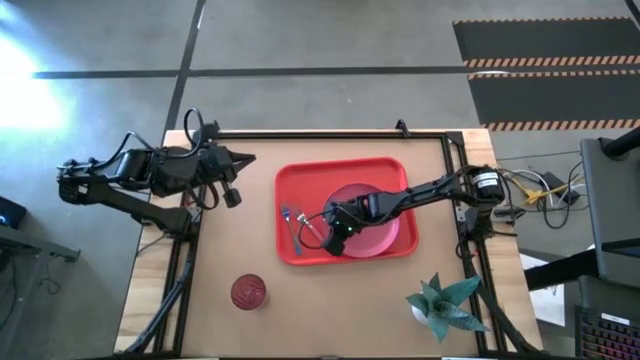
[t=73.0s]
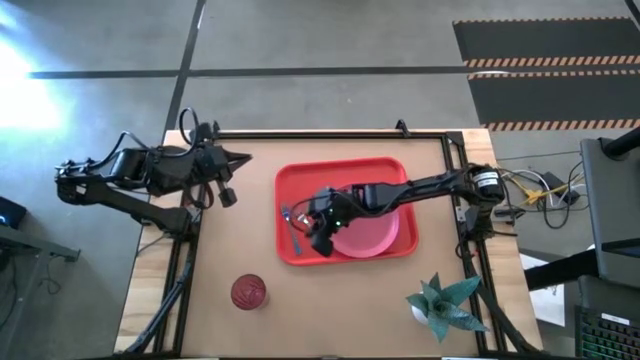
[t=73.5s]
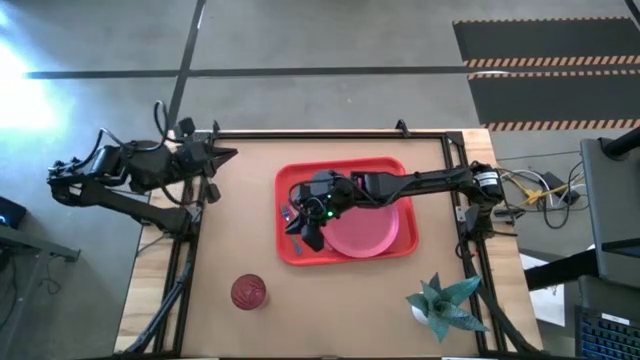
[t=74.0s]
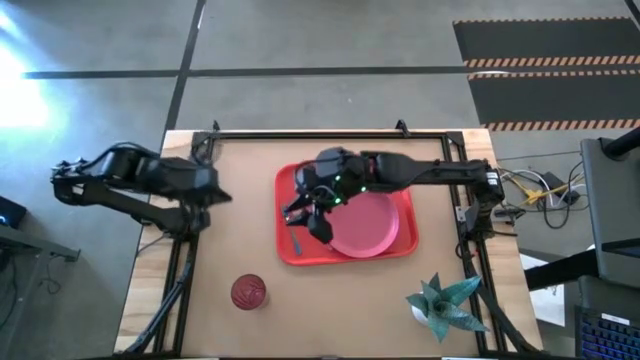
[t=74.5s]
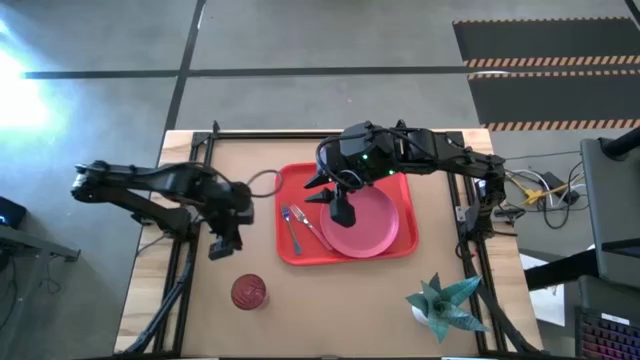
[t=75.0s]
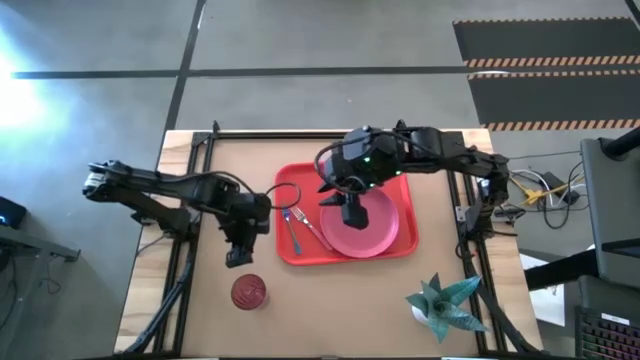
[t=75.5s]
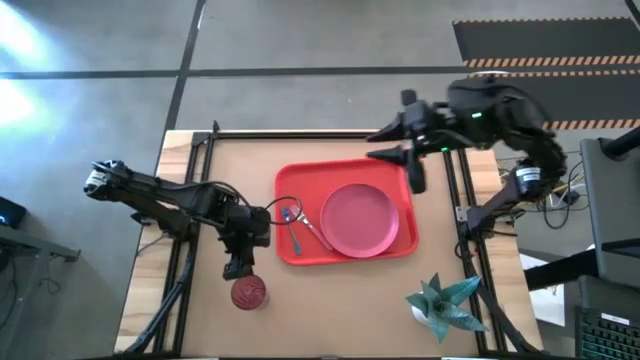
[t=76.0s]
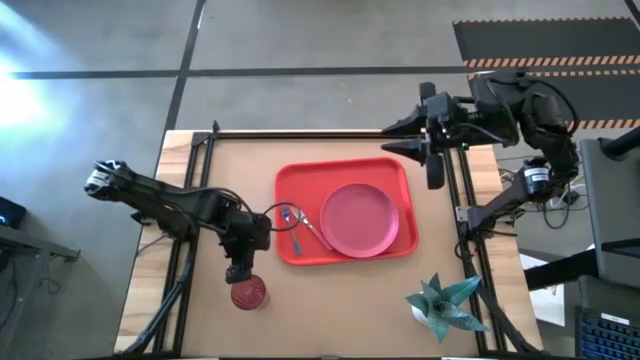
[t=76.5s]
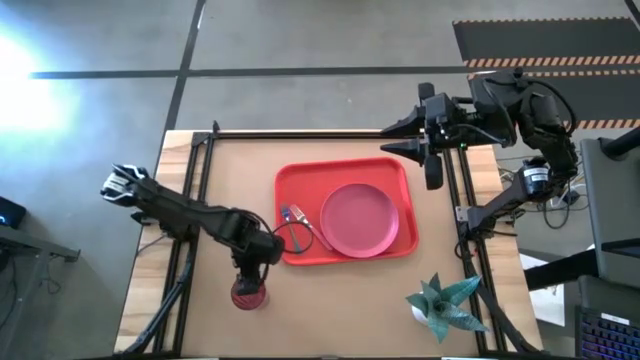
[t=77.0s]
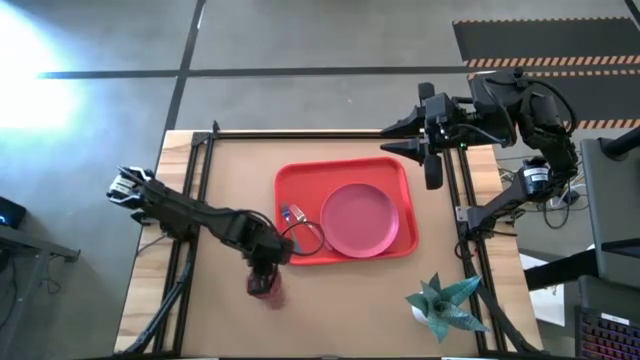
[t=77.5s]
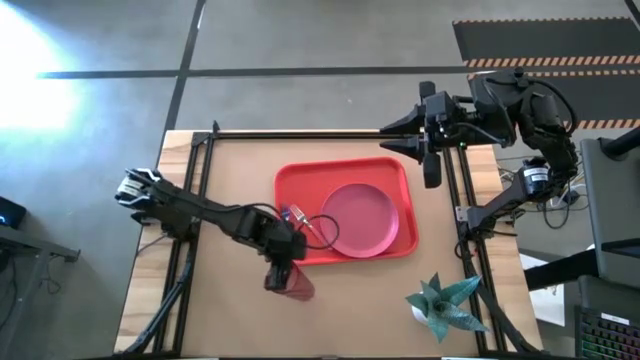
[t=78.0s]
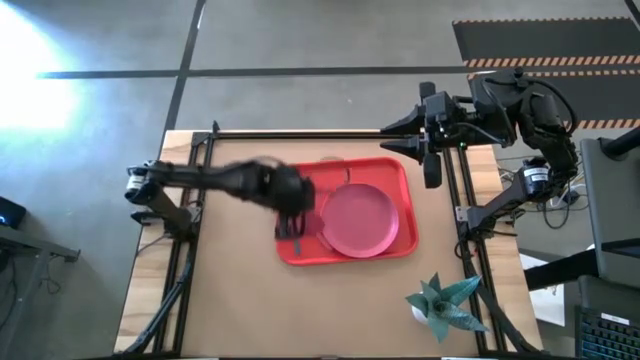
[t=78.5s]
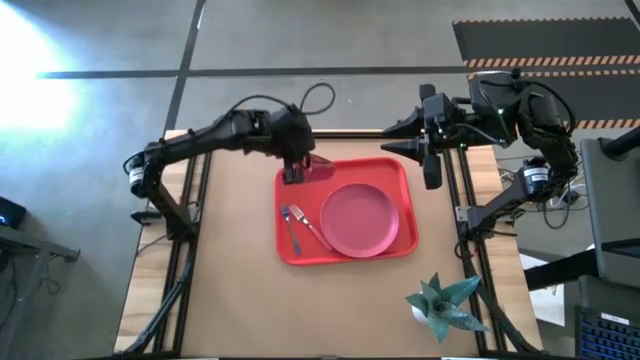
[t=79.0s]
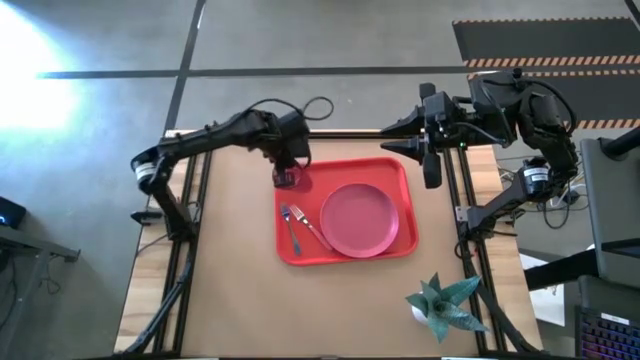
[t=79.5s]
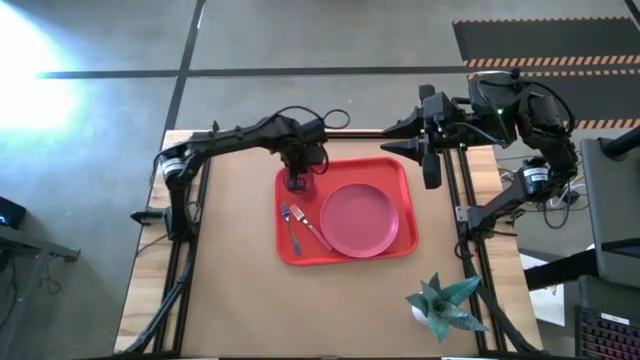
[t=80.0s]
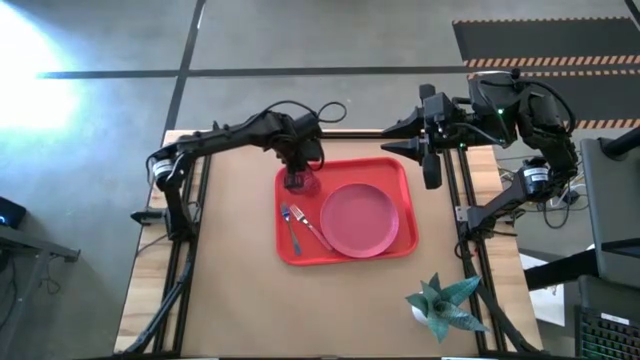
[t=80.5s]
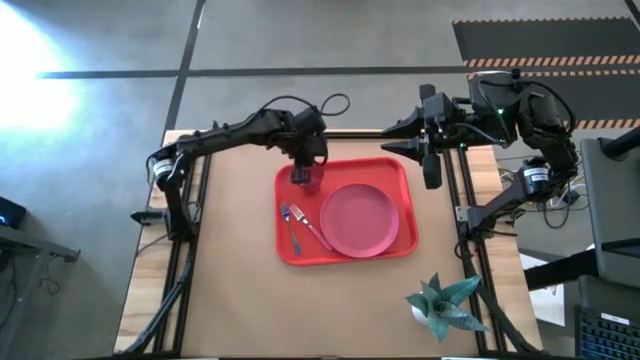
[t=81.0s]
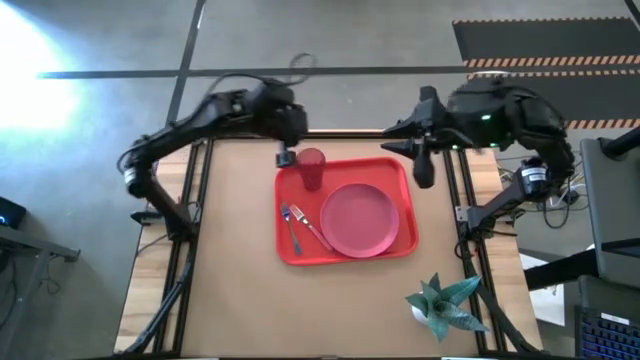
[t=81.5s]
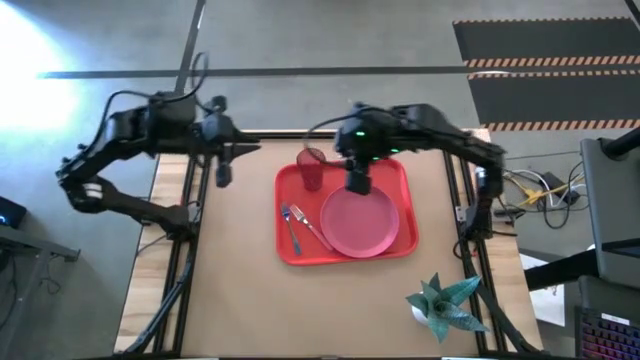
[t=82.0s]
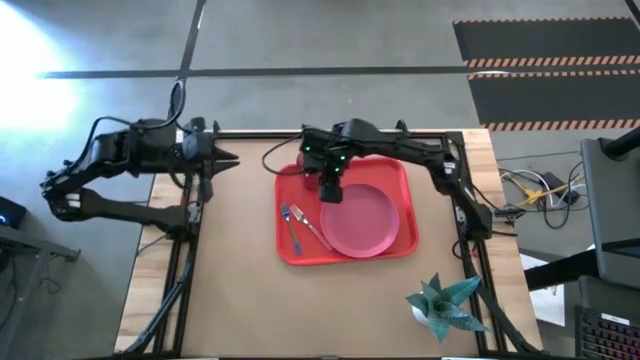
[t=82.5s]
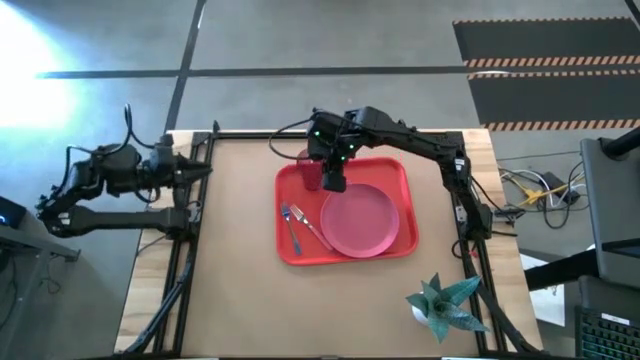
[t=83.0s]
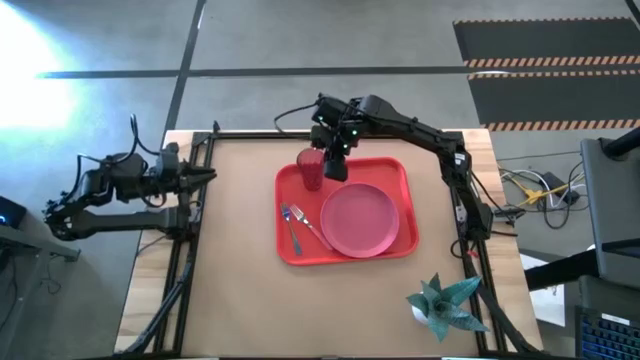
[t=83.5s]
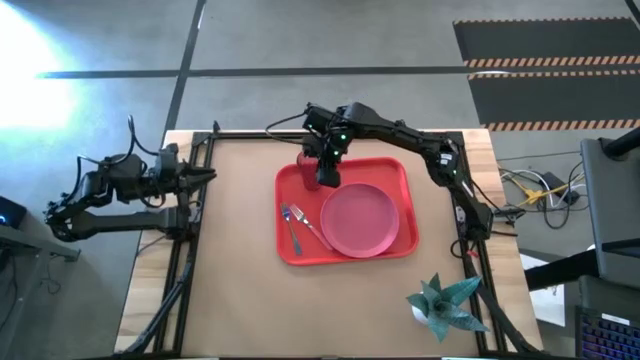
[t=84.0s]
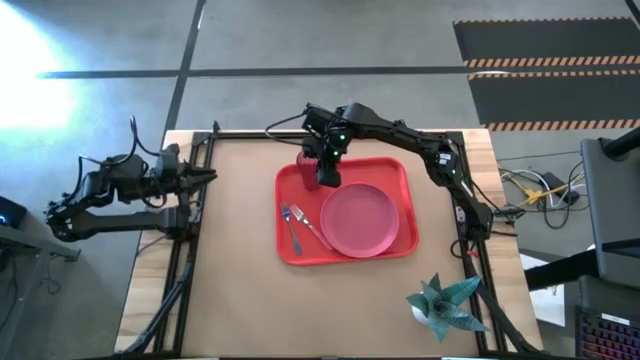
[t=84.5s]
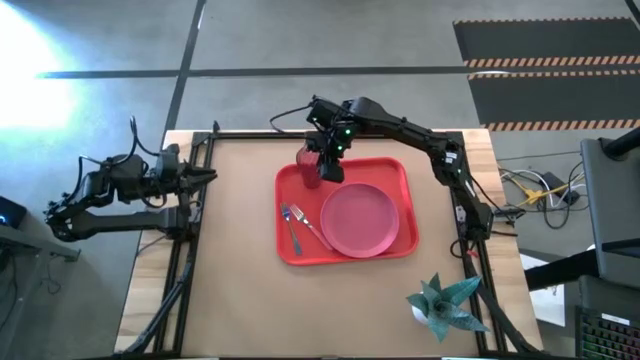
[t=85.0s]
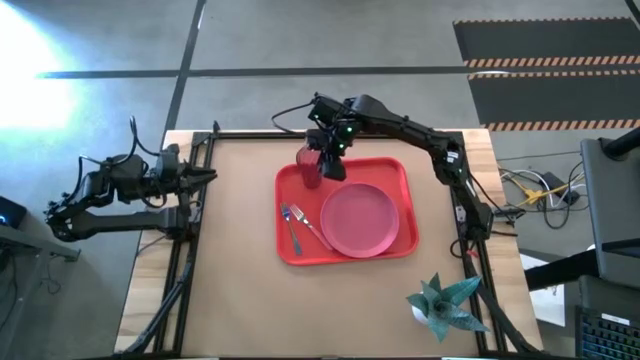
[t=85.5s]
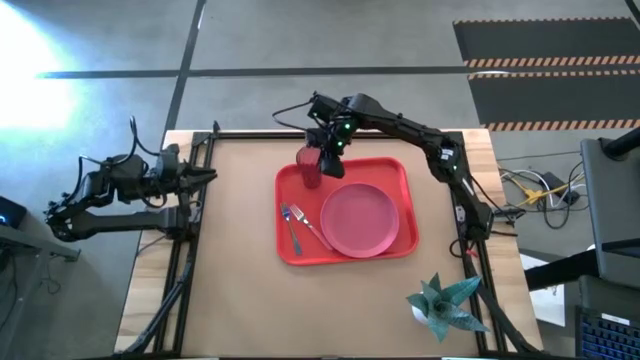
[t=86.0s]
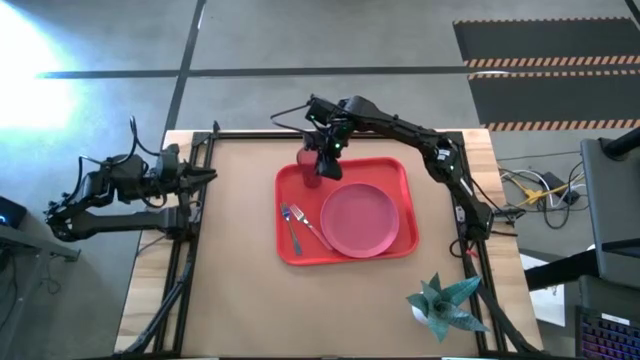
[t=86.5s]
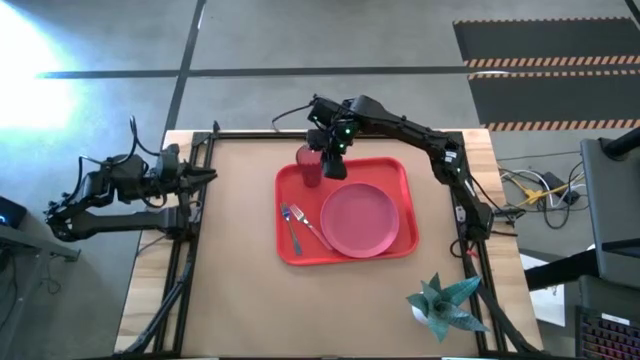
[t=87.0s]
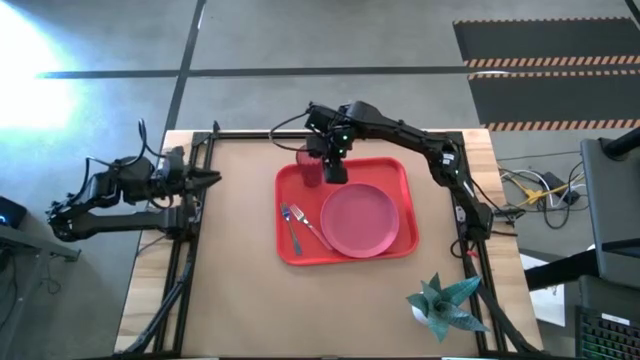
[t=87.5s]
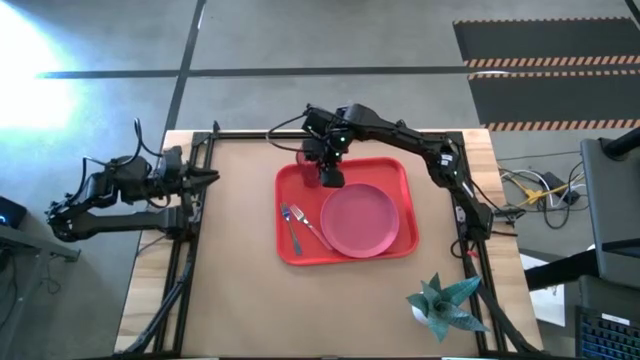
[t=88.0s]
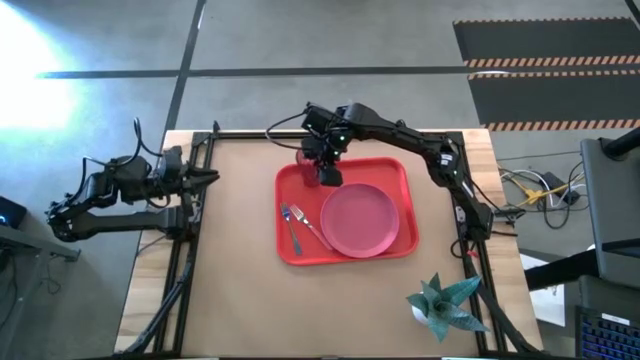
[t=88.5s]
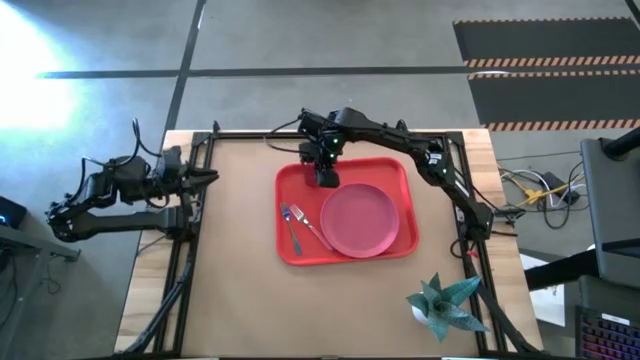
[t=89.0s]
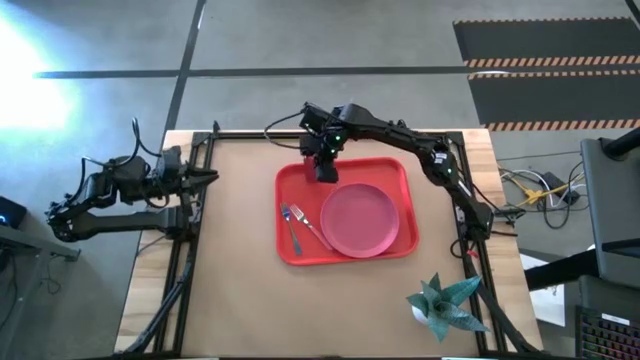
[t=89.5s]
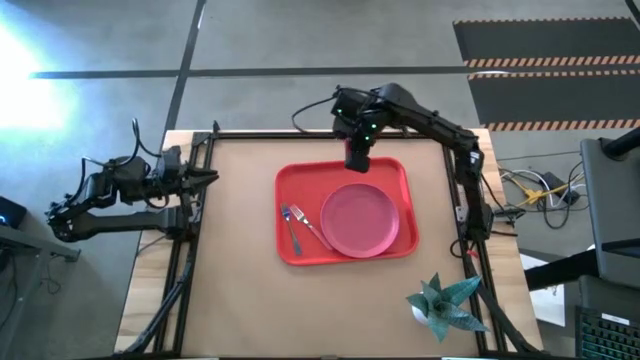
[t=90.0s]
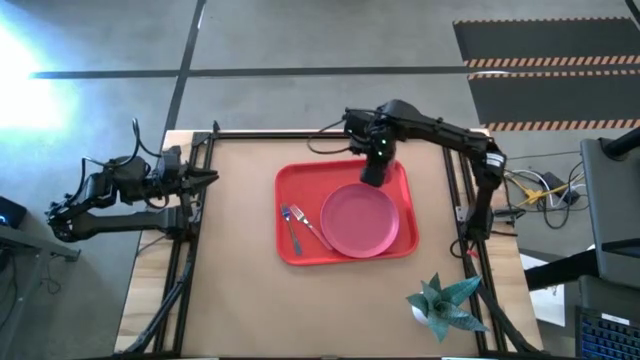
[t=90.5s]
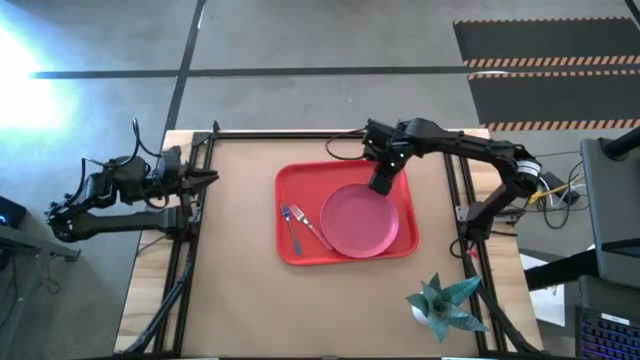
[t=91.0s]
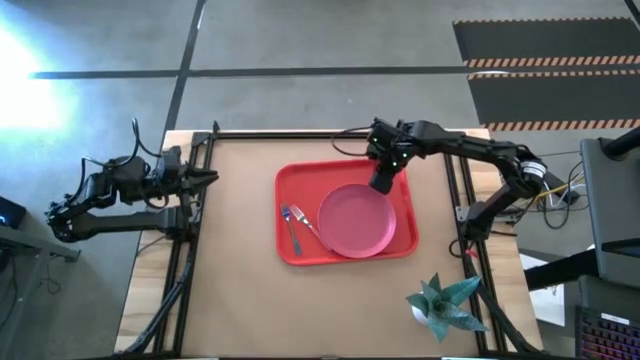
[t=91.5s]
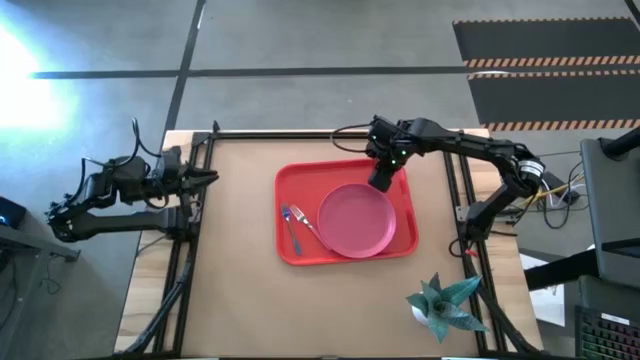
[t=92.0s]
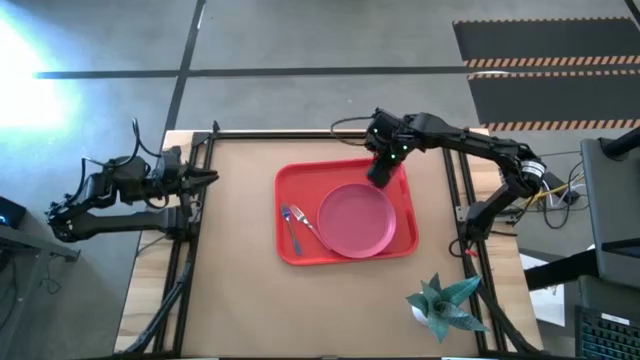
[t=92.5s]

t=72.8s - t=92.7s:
Task: Pick and place plate/cup/fork/spoon on tray
Put the red cup on the top right of the red tray

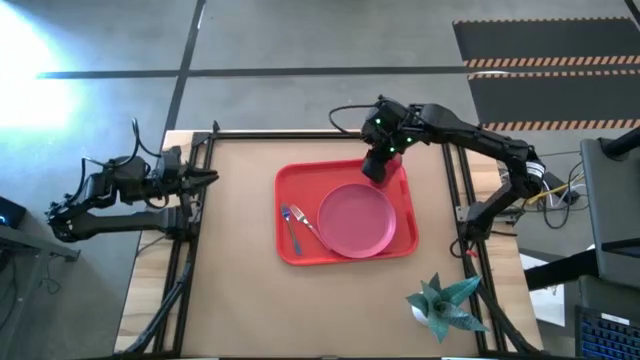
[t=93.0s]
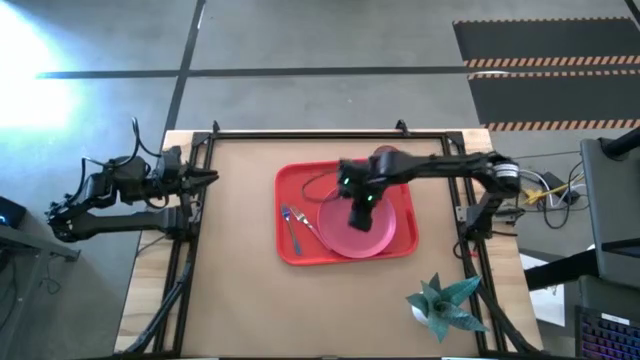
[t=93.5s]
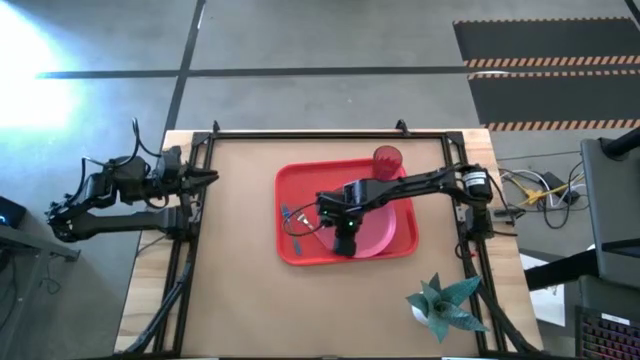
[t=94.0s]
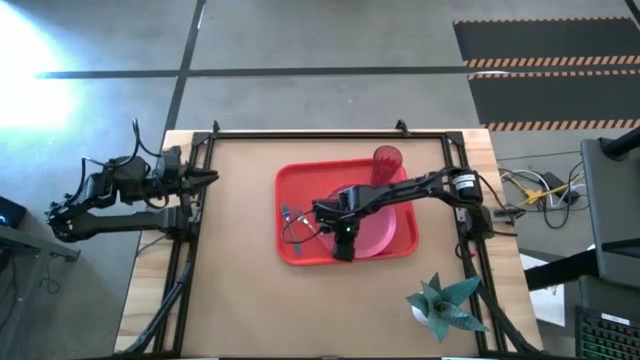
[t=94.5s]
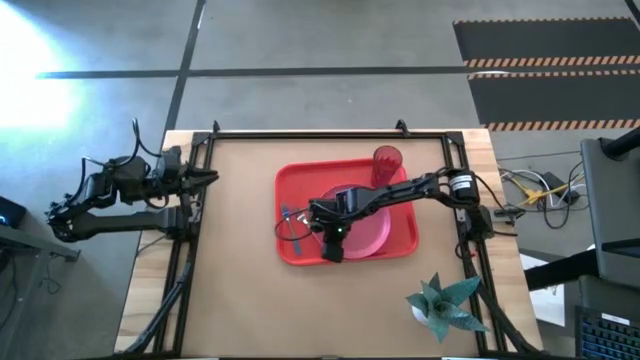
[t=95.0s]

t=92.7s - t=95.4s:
Adjust the pink plate on the red tray
